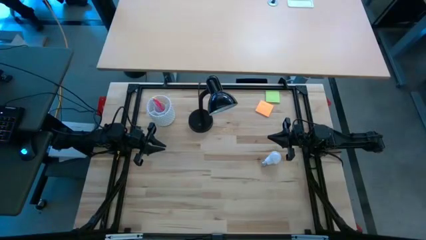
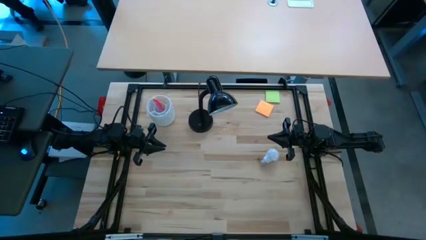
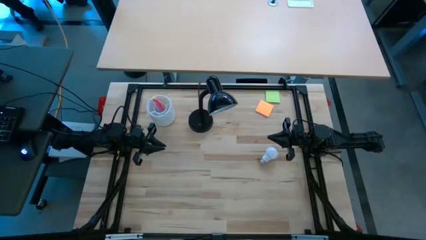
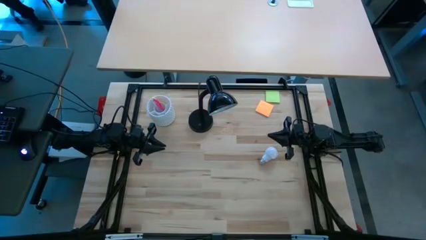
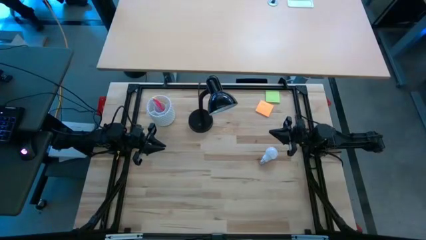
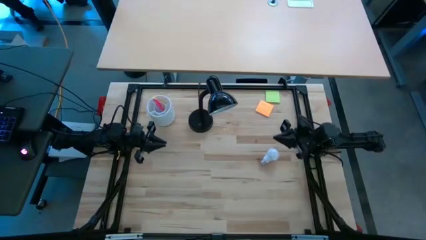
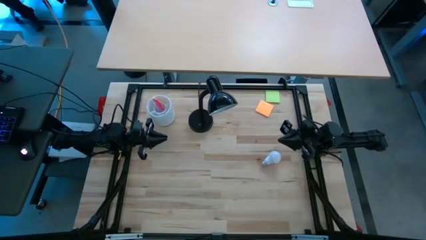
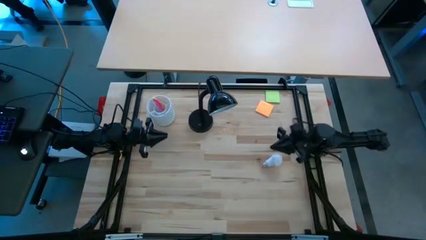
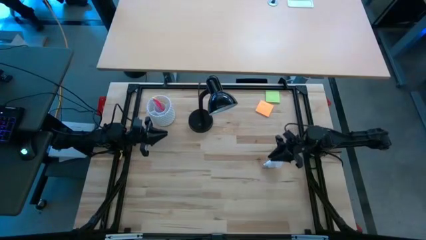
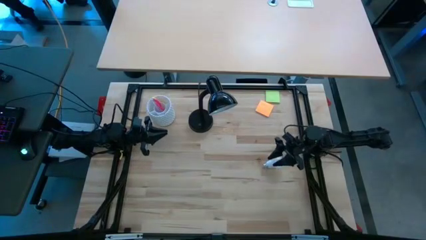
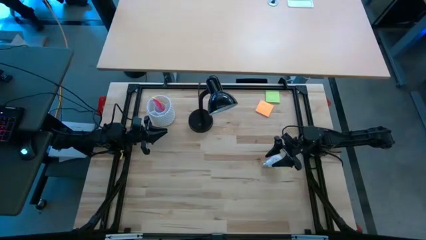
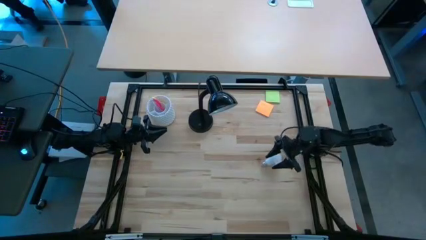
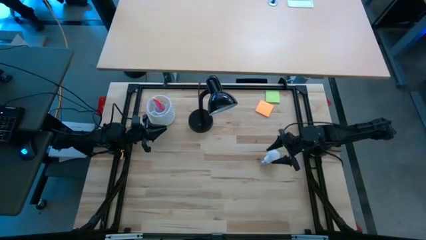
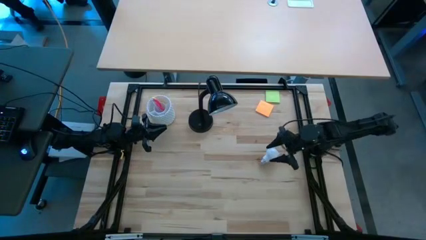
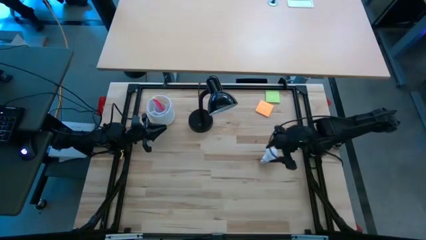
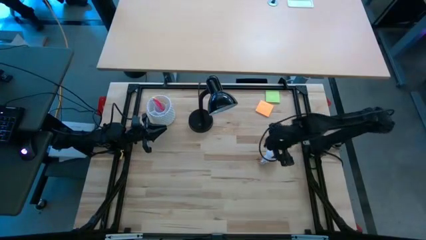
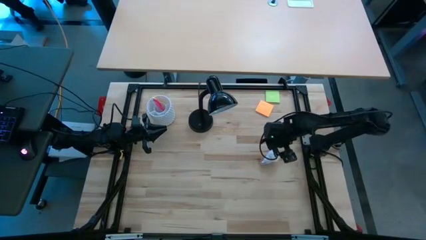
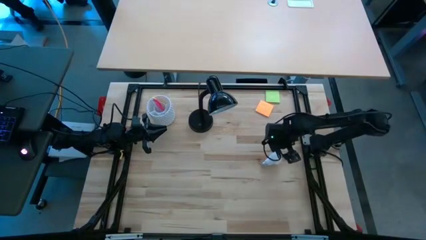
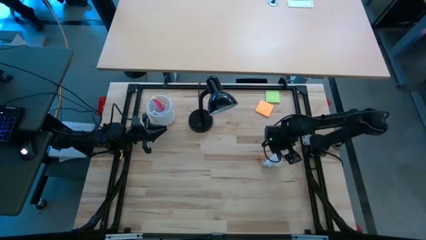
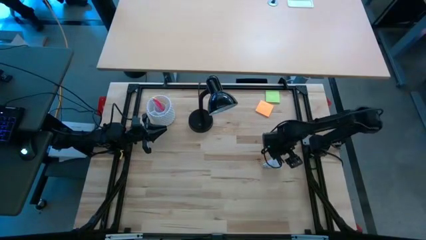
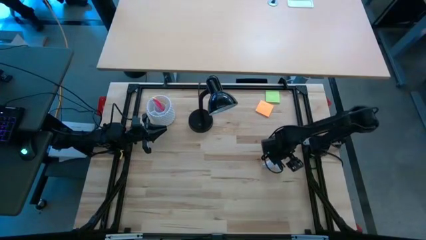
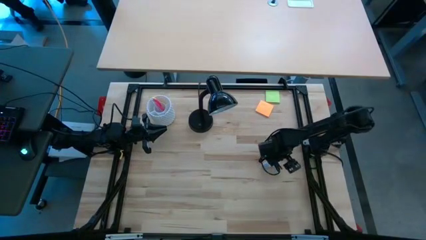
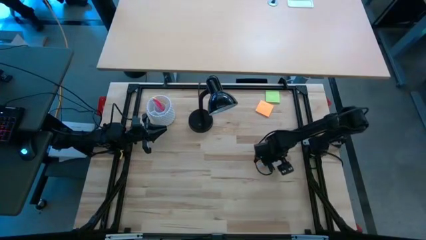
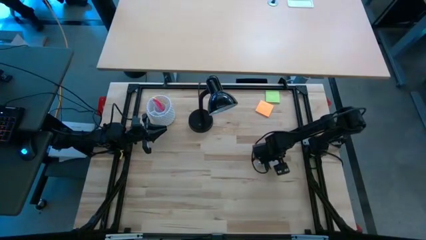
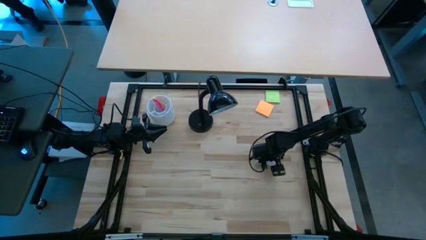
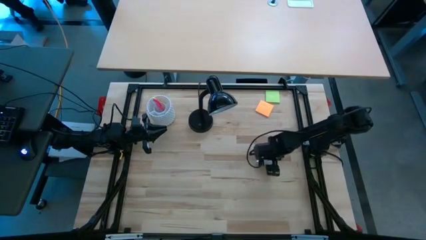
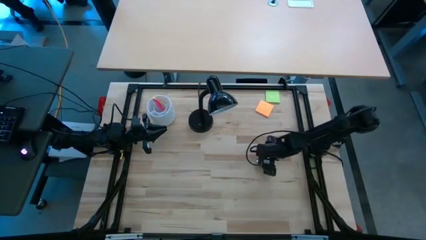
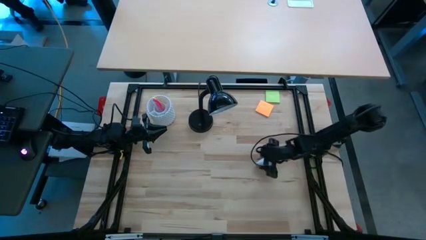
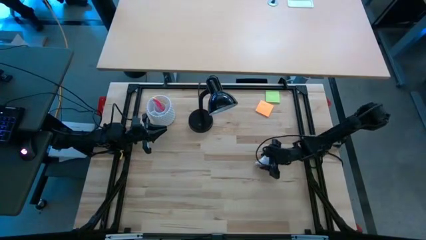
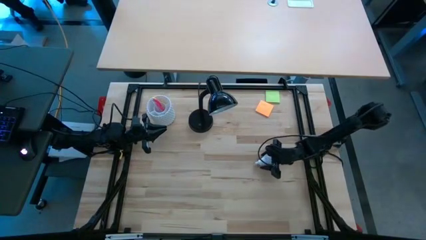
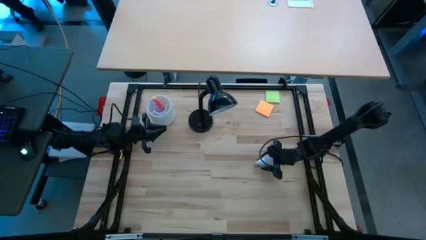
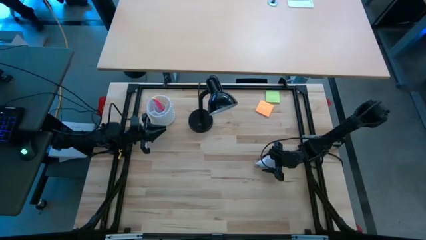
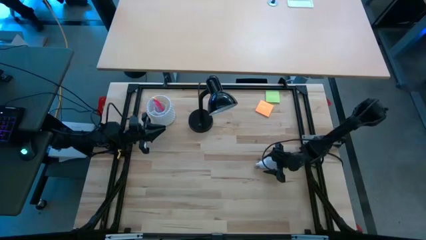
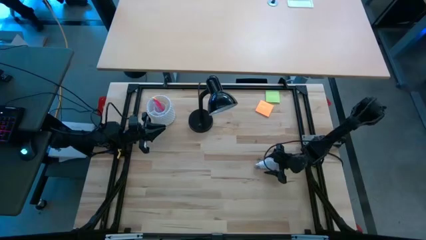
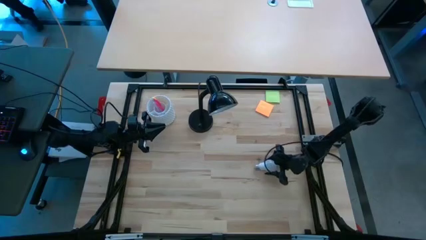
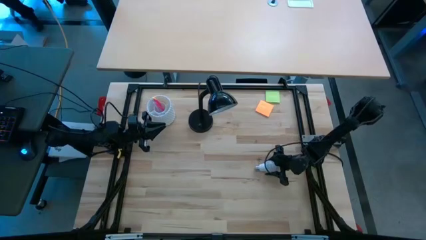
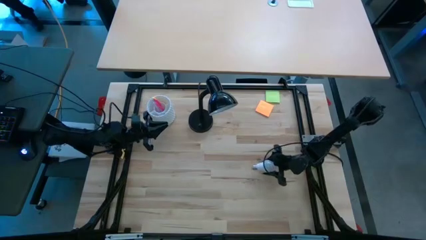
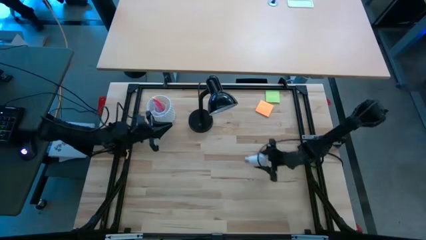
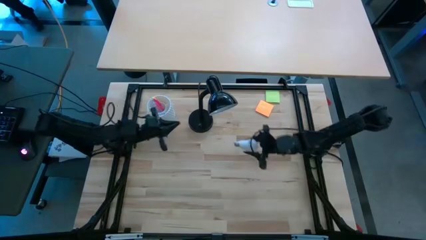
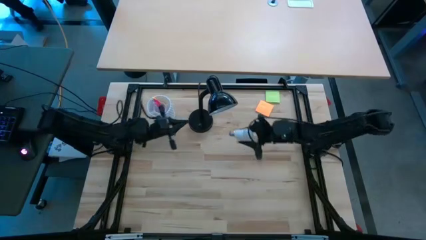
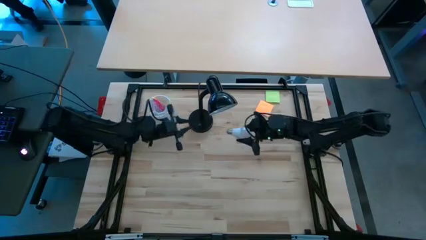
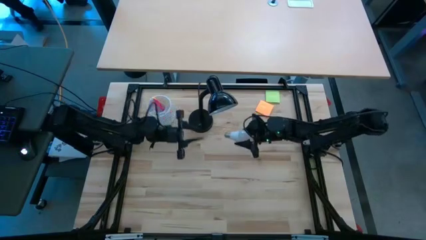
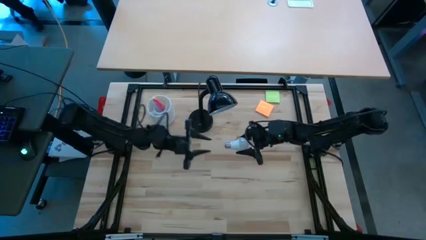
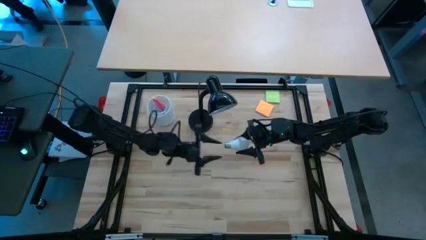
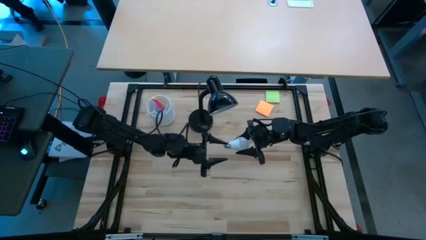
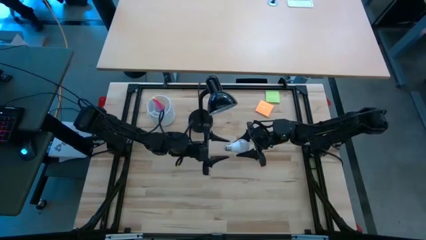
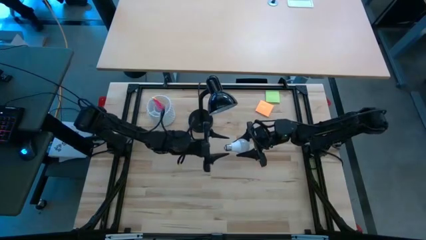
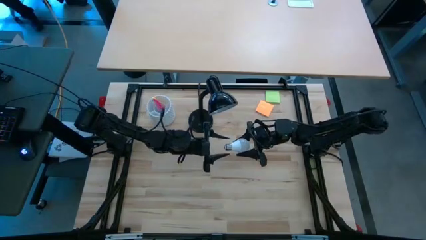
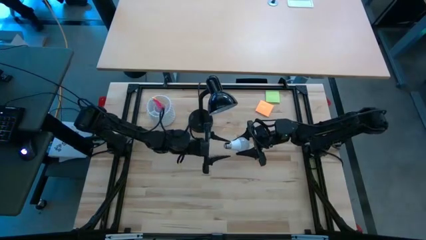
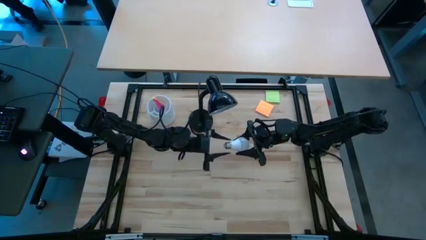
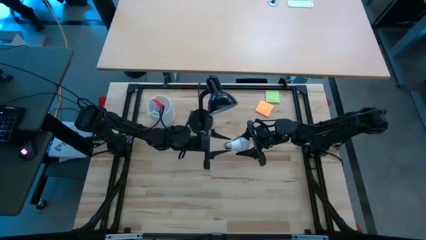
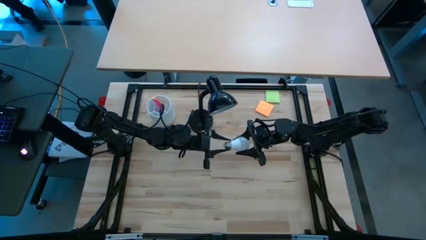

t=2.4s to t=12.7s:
Task: Screw lightbulb
Prepare the light bulb
